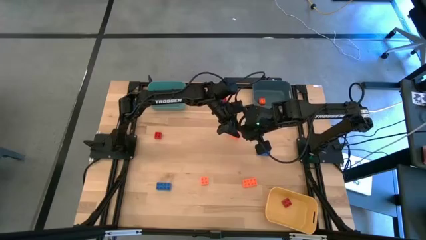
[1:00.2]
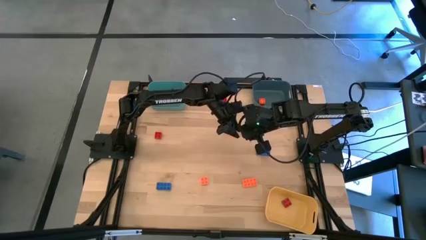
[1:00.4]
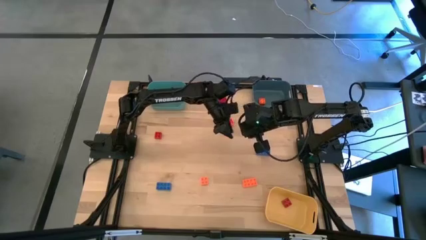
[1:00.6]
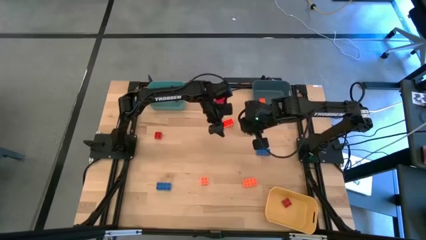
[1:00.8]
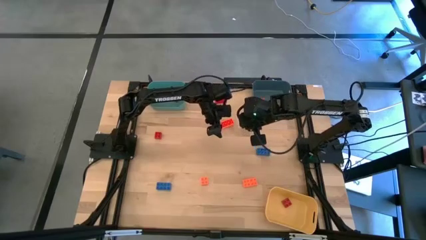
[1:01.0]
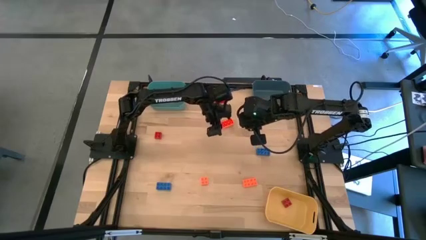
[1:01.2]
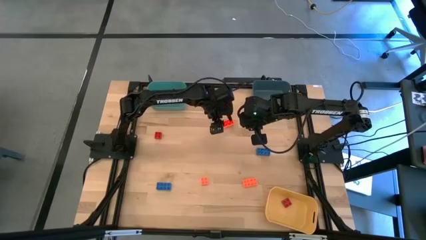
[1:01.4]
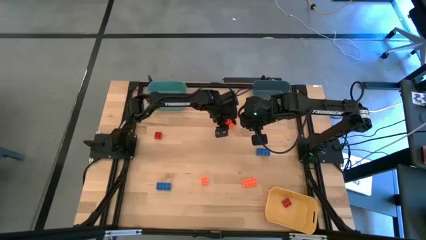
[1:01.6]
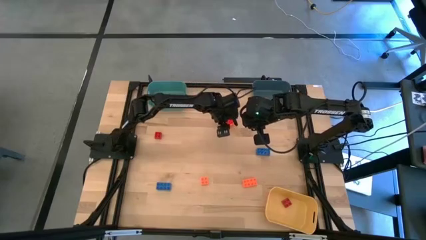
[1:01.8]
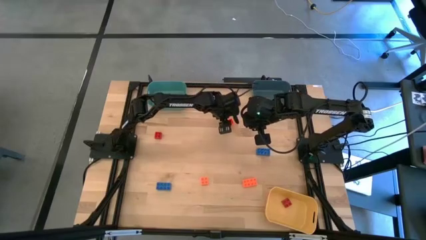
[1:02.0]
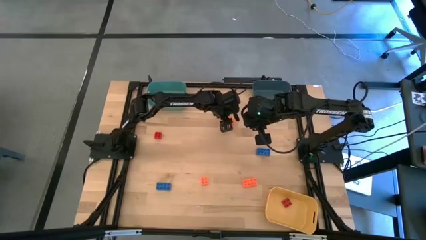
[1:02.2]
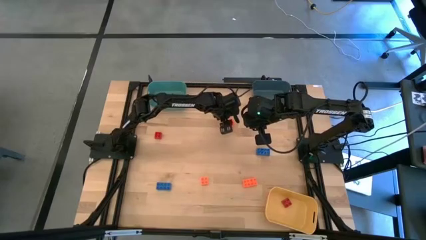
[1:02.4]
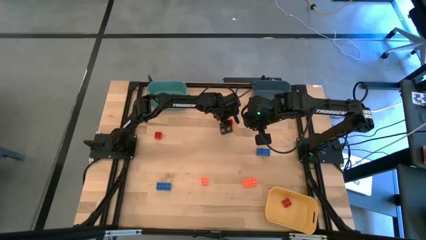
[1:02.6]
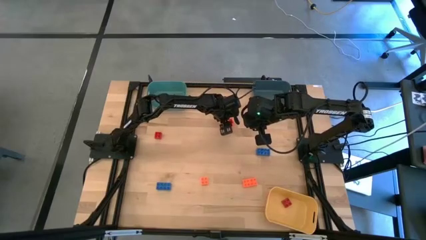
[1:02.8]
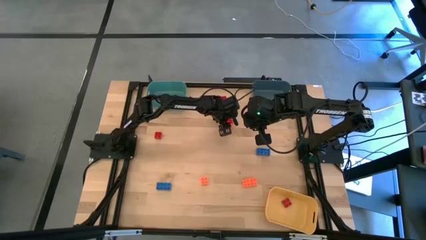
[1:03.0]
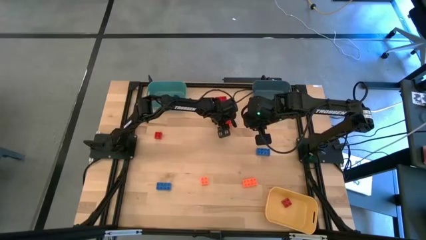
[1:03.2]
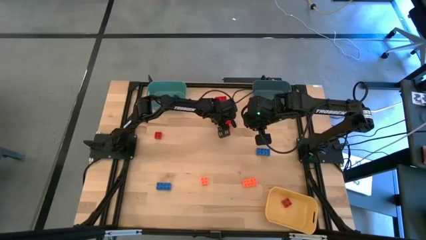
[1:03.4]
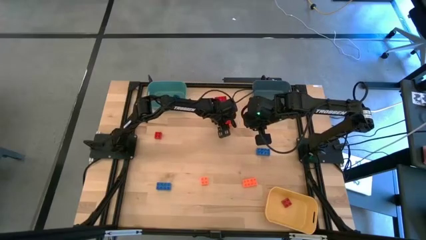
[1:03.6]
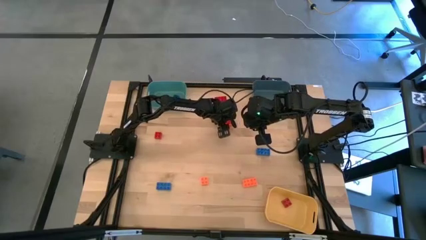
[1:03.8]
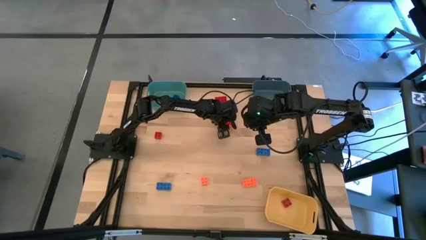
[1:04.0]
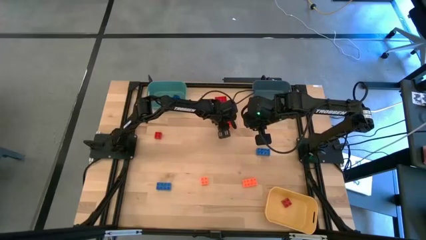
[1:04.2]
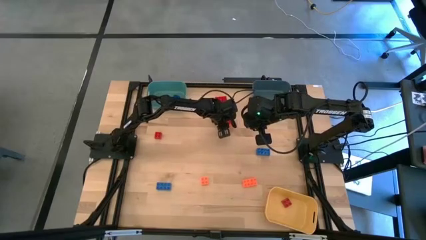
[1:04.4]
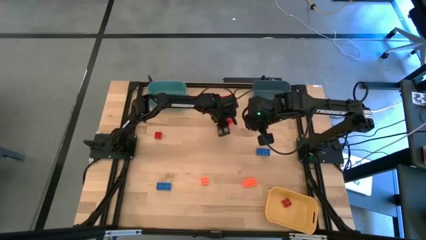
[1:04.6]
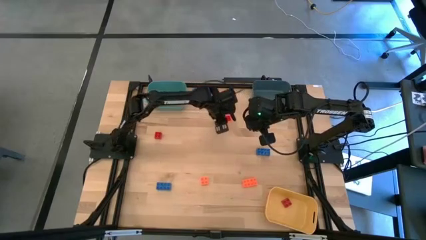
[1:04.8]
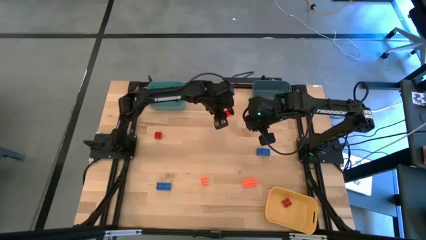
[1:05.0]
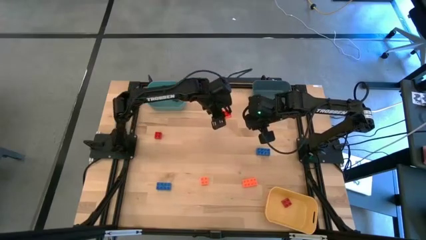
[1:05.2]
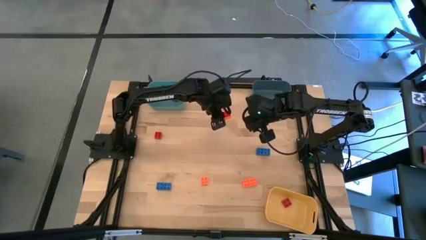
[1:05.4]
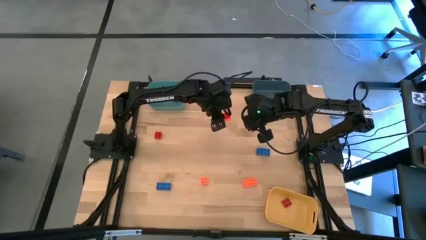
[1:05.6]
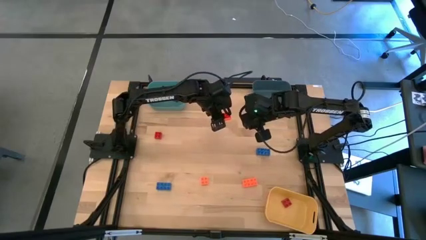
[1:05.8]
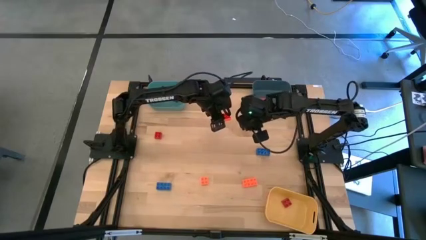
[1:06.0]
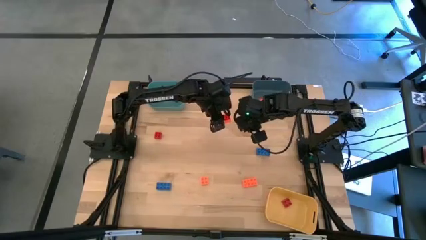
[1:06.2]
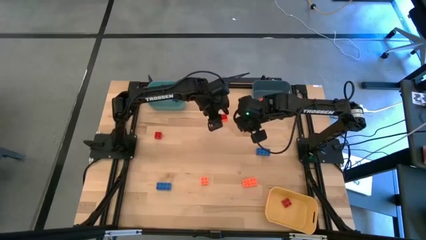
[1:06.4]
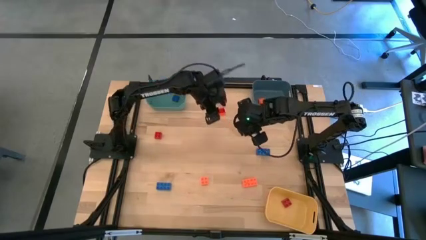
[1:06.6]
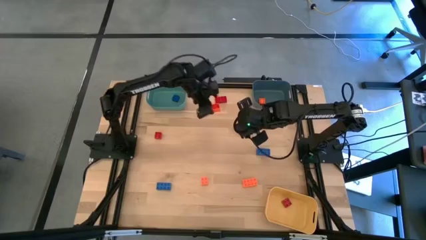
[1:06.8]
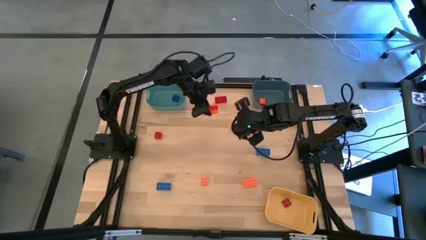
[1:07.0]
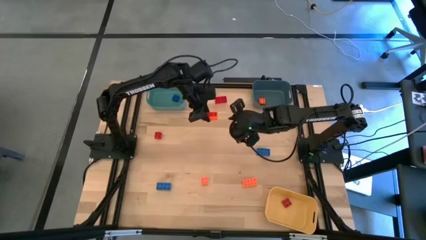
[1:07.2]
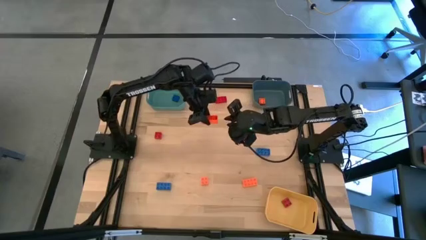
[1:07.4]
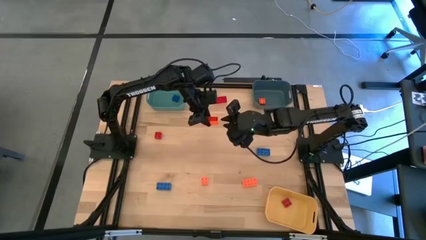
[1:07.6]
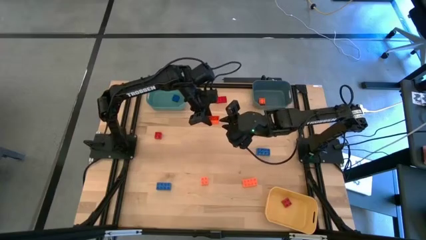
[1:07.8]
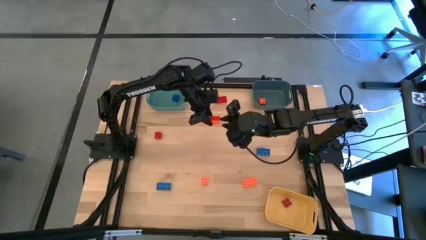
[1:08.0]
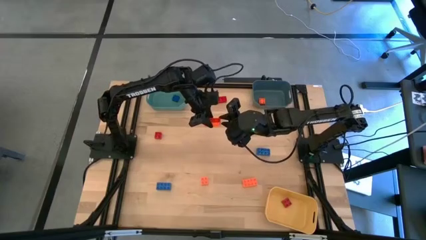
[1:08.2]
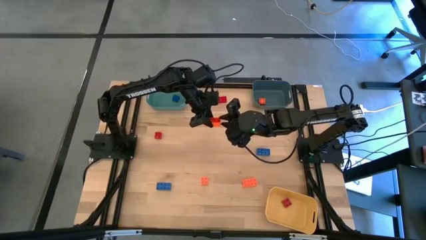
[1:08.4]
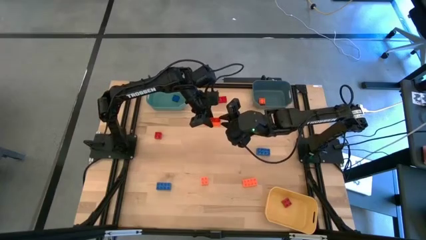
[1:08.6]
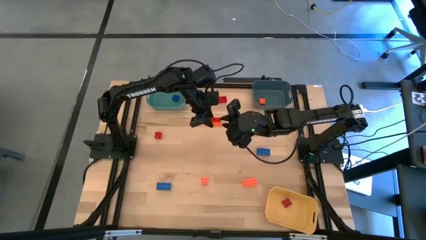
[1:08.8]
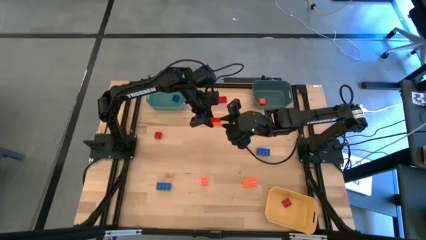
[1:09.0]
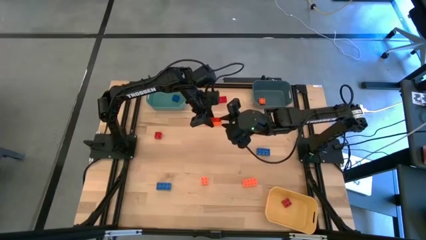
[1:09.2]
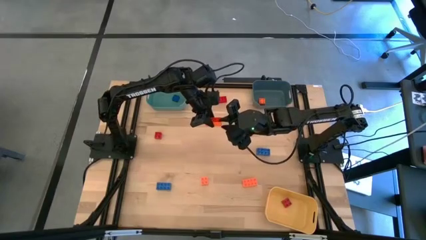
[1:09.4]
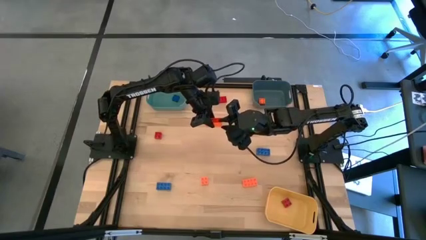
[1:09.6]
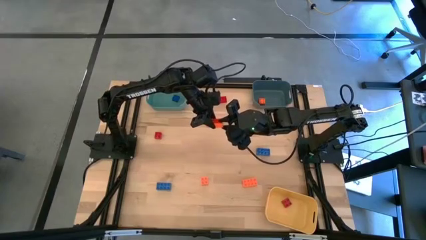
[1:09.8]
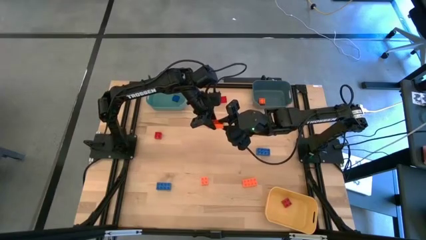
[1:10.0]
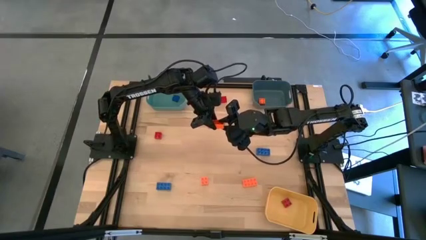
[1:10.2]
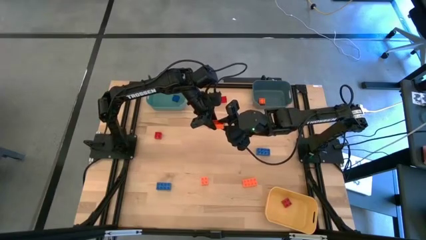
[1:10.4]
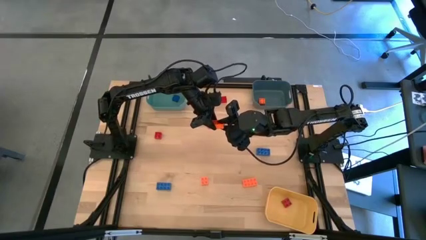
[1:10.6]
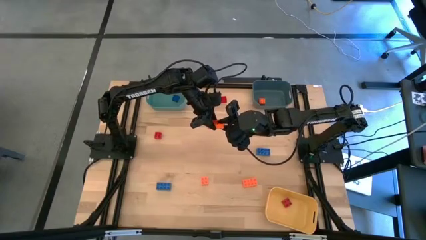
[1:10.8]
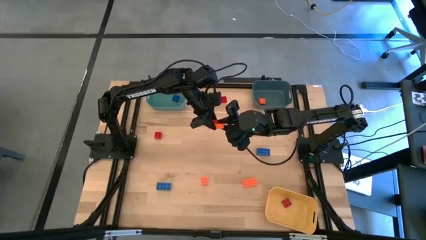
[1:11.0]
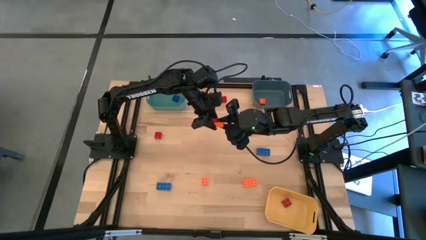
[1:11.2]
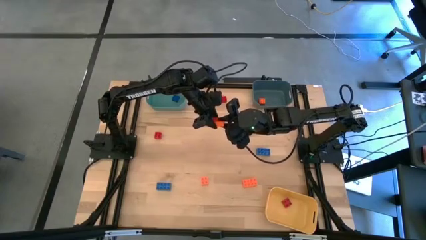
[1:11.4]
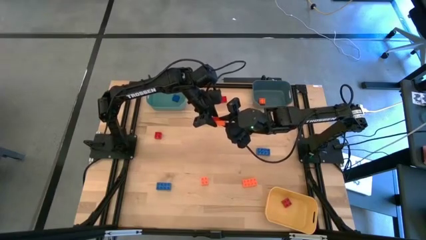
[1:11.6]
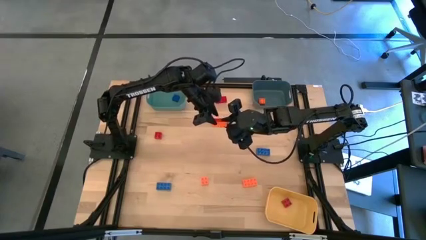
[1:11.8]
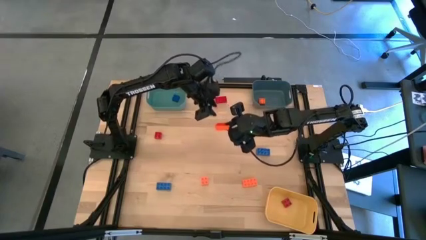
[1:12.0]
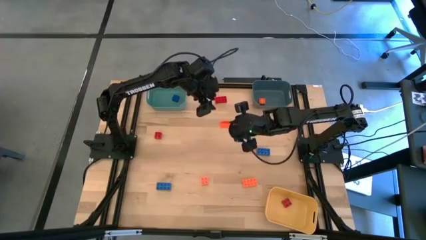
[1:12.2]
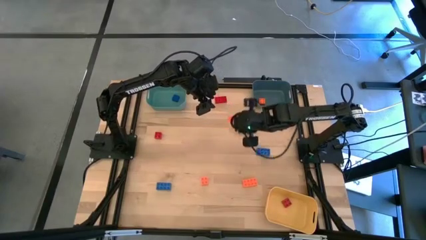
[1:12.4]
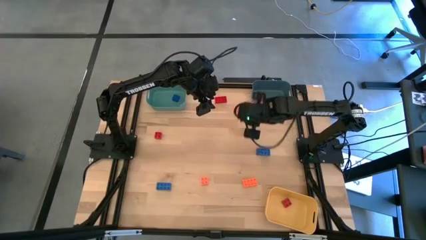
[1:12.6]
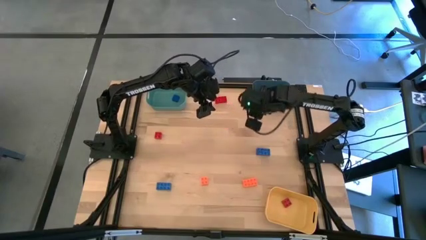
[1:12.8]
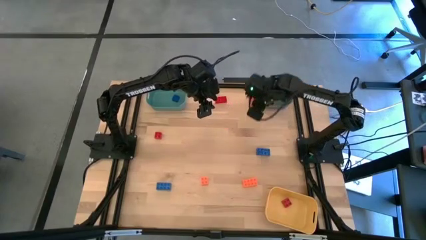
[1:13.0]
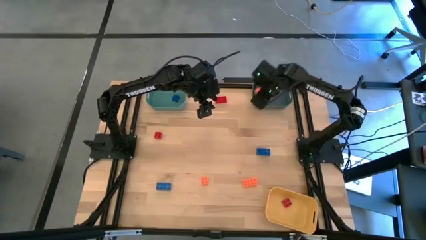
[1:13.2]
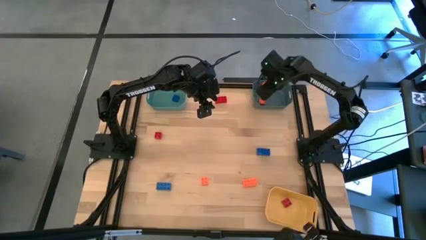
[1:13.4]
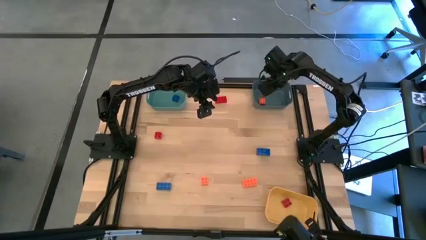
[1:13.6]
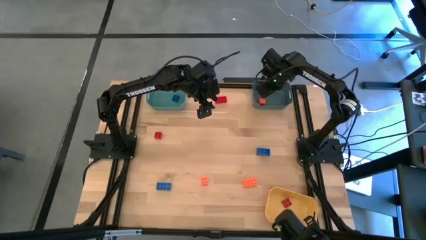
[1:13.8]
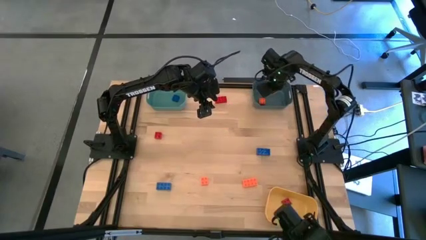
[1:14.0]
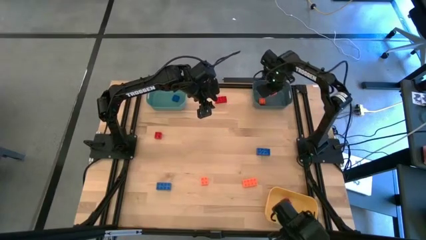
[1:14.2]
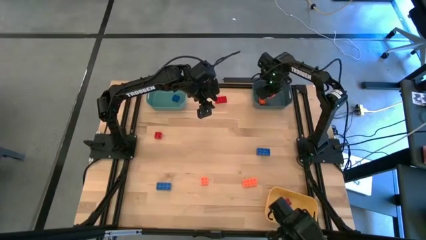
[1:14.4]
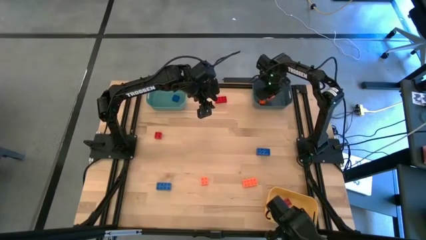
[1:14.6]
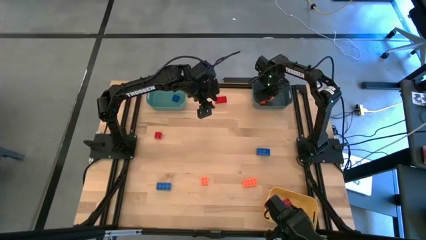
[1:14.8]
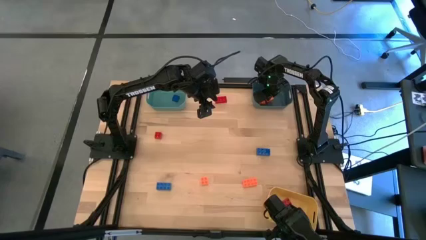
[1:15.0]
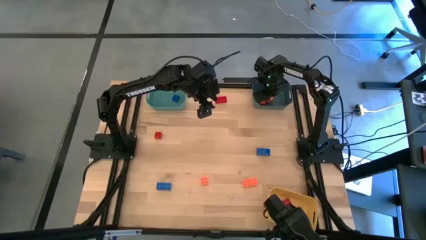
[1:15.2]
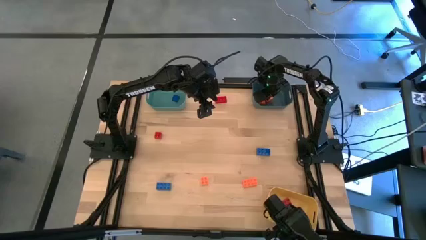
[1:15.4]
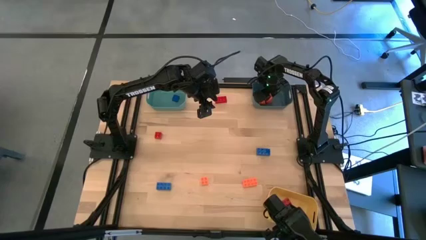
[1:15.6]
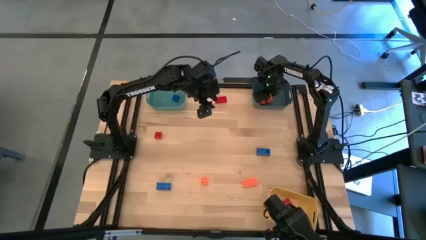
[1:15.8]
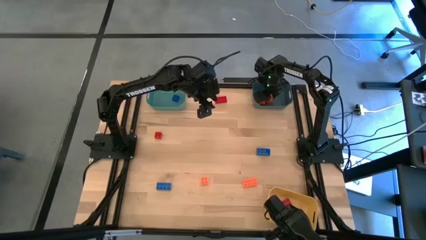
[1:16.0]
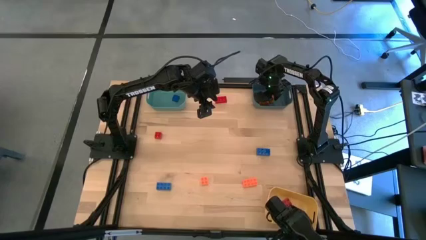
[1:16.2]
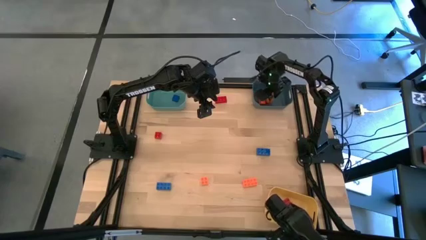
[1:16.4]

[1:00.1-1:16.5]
Task: Sort & place blocks by color
Put the orange game piece into the dark blue bin

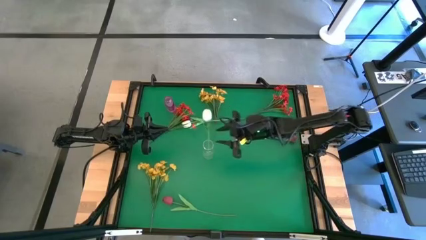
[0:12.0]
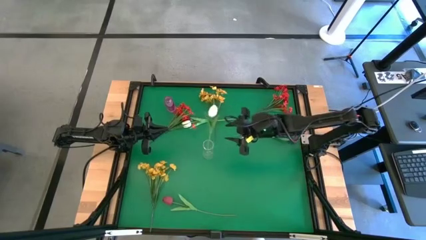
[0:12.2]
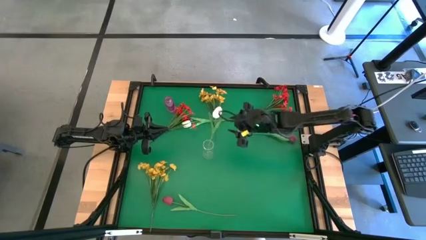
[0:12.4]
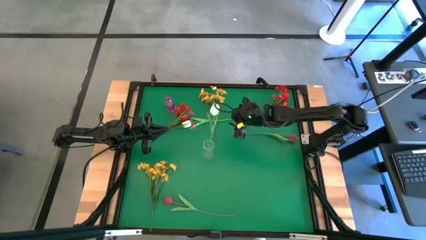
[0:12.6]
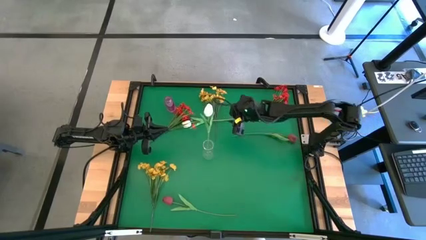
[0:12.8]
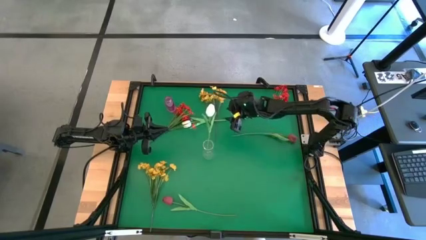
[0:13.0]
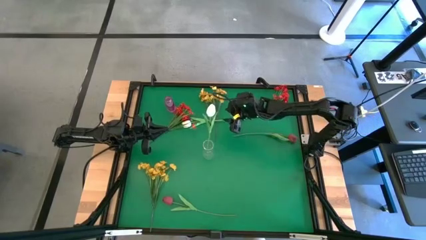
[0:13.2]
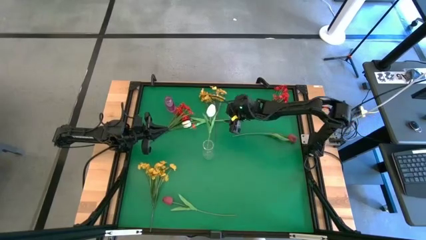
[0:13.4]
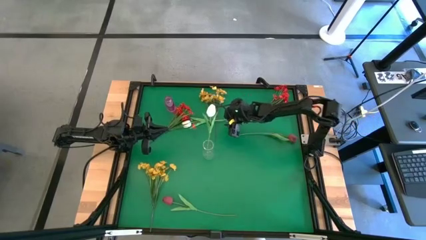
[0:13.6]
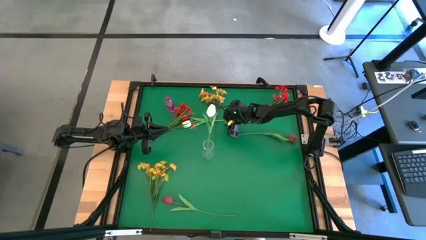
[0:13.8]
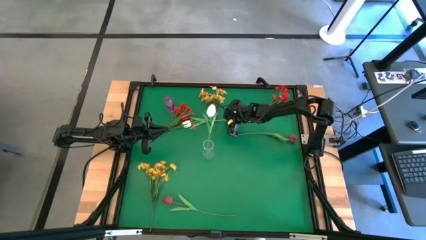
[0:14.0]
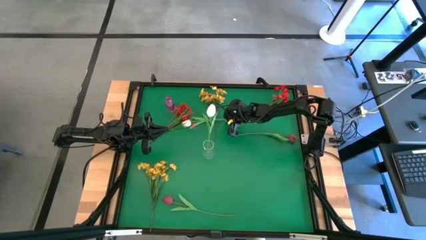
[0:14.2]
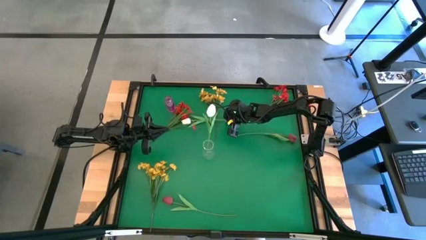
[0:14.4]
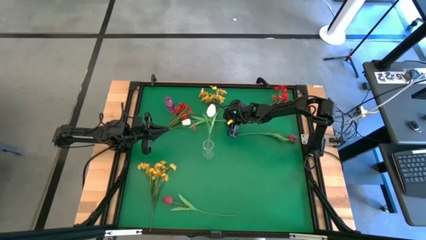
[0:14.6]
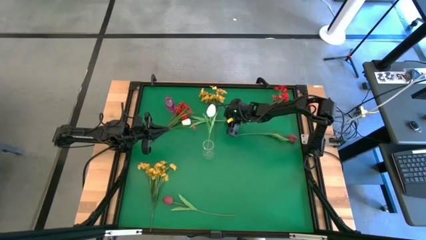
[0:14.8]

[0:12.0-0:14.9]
Task: Sort flowers into vase by color
Put the white tulip into the transparent vase
